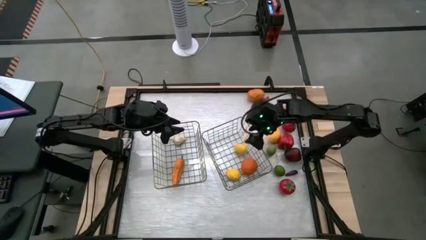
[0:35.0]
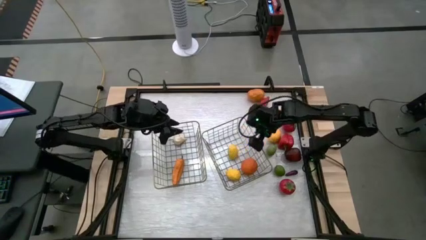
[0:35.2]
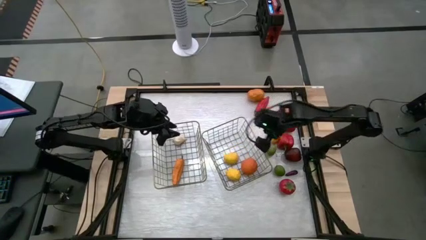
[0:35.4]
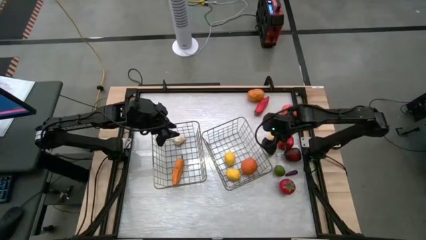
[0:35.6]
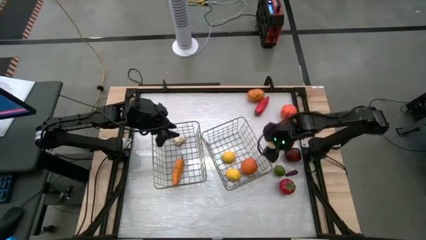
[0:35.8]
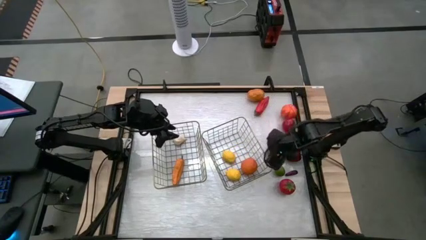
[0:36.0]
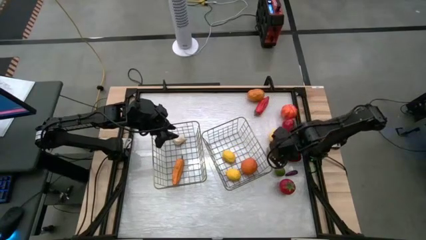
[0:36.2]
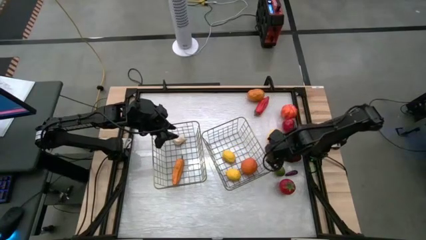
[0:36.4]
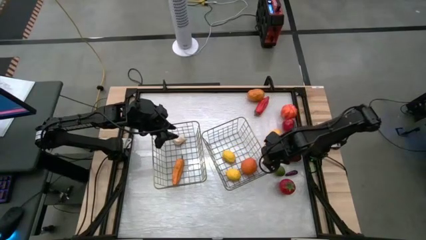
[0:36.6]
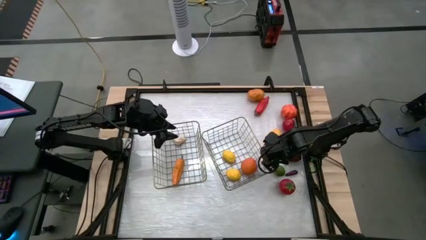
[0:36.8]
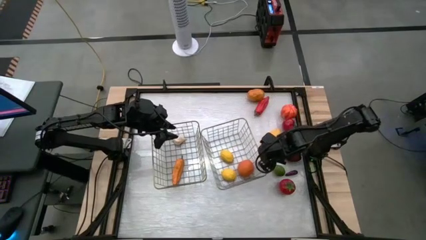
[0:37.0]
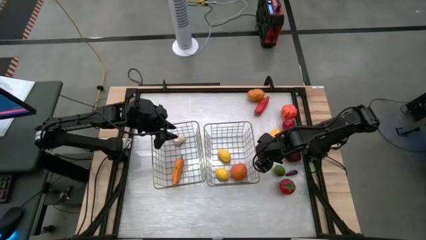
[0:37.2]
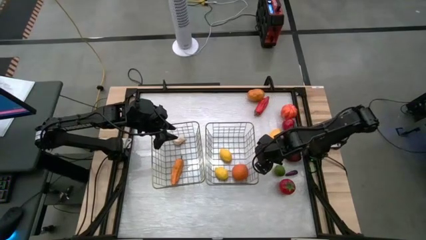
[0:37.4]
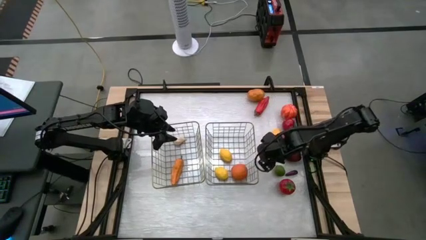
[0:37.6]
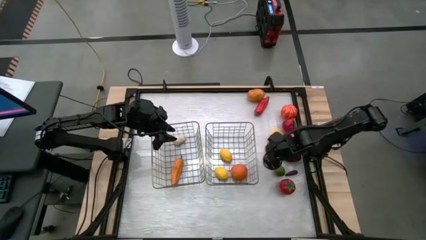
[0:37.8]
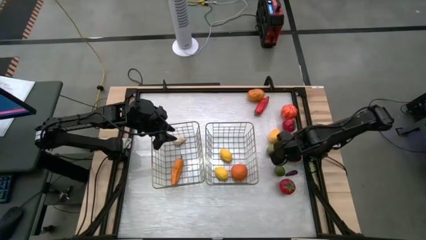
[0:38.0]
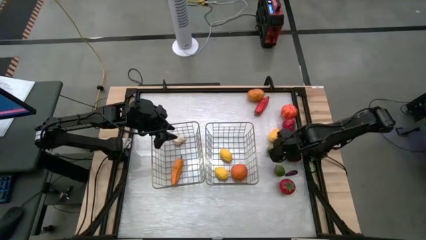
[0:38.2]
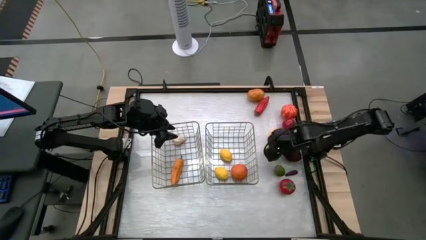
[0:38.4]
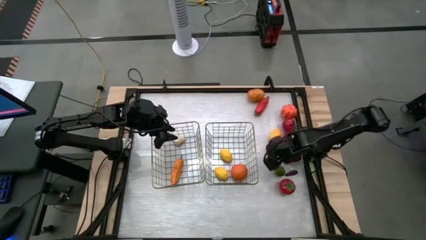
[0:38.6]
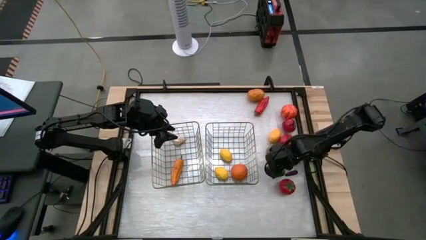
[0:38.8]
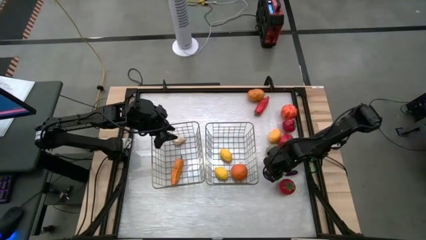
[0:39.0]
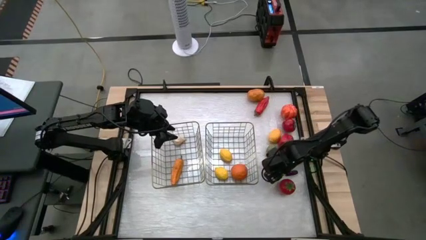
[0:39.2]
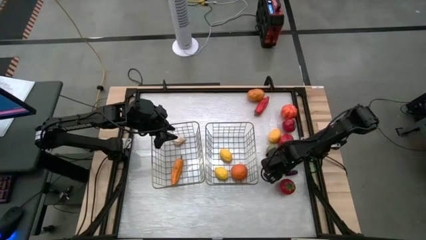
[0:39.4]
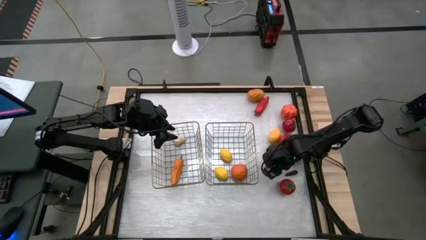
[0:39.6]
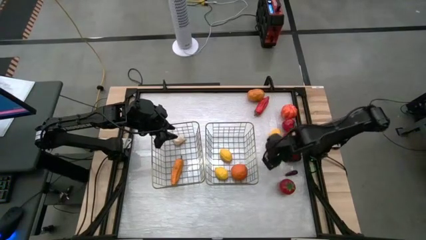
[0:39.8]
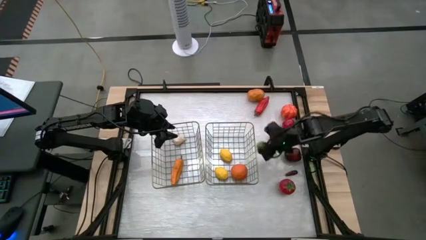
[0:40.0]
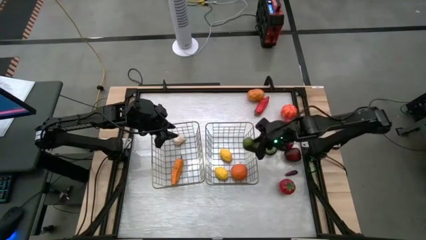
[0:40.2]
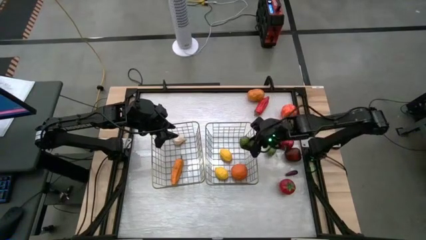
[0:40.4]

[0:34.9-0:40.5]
Task: Sort produce into baskets
Put the bottom green lime into the right basket

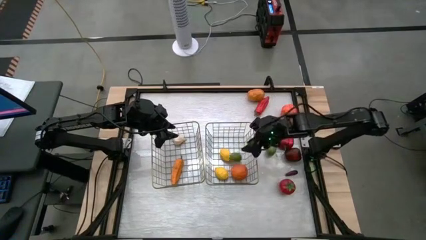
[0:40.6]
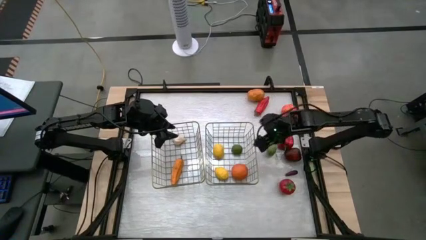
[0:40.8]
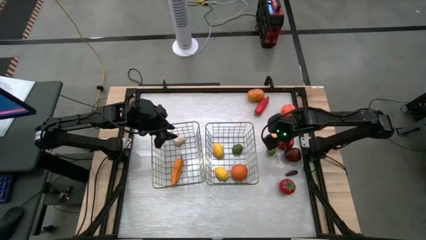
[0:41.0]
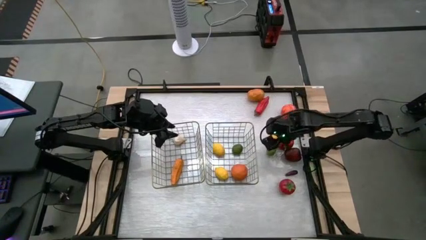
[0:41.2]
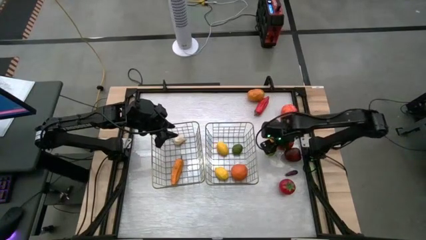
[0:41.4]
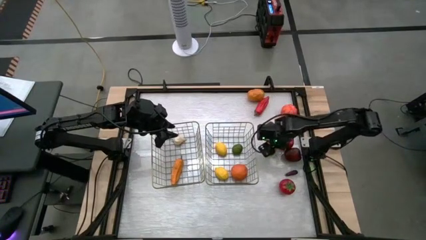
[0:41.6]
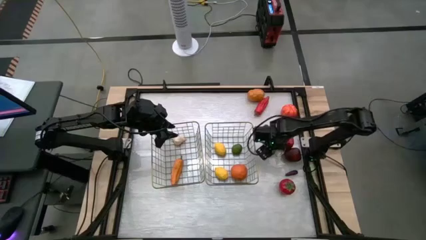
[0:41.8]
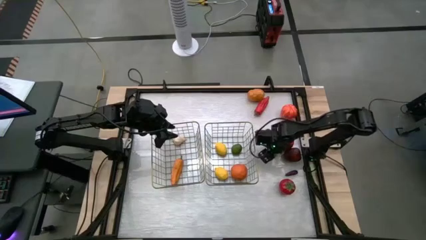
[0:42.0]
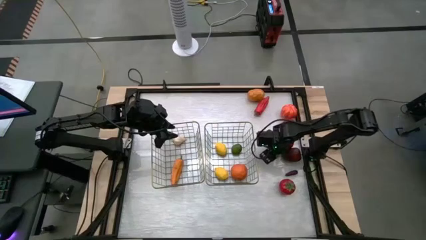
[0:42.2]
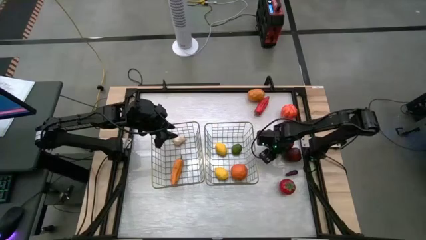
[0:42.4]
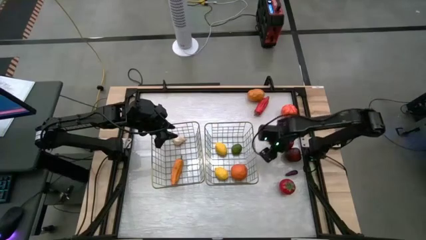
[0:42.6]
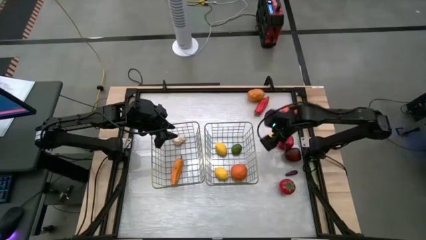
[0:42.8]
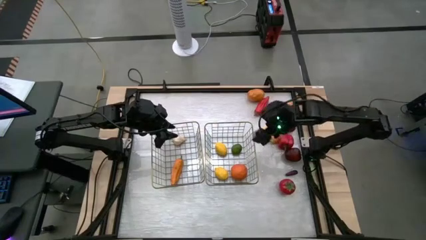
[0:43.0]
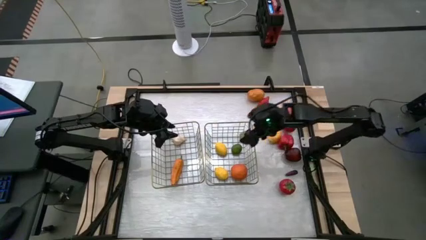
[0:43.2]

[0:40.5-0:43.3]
Put the green lime into the right basket

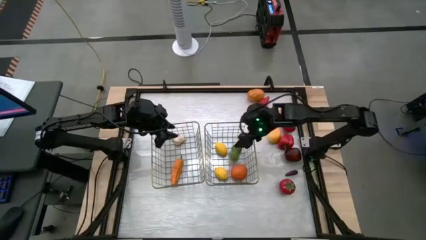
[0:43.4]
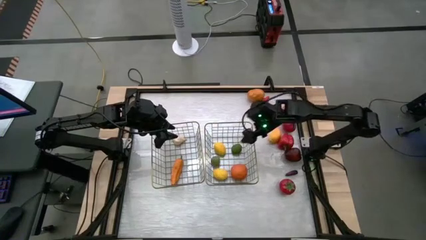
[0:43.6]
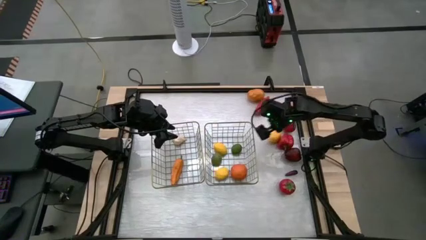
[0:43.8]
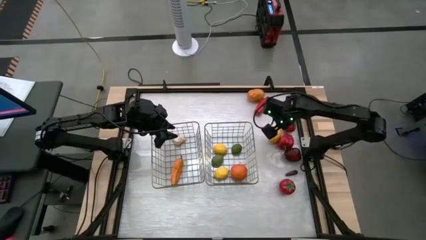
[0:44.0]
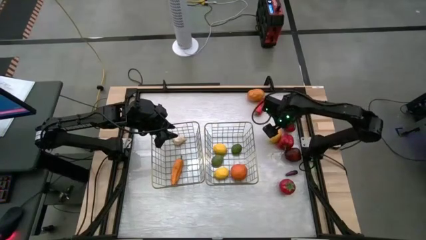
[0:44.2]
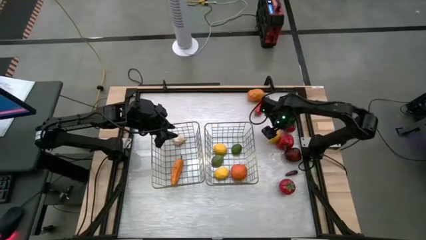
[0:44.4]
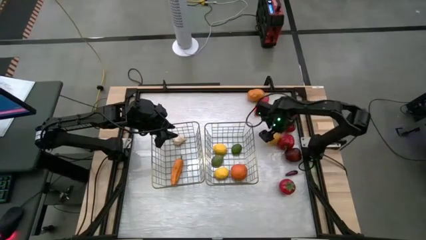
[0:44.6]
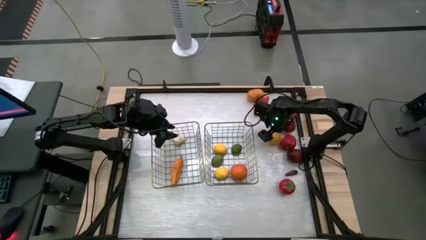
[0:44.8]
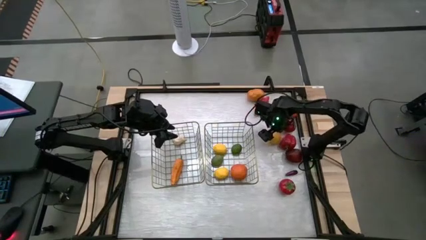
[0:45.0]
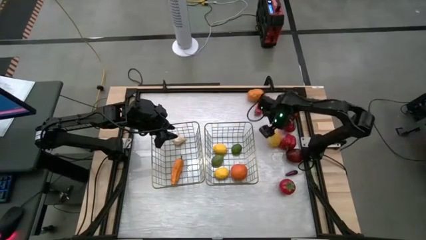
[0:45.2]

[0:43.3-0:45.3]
Put the yellow lemon into the right basket

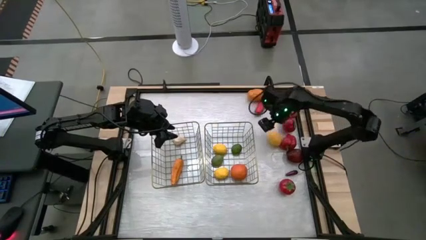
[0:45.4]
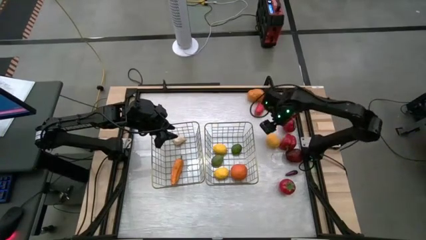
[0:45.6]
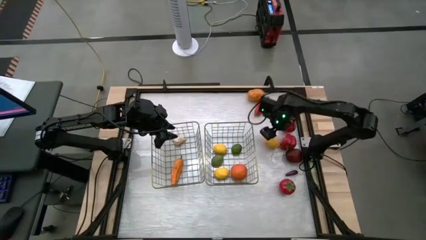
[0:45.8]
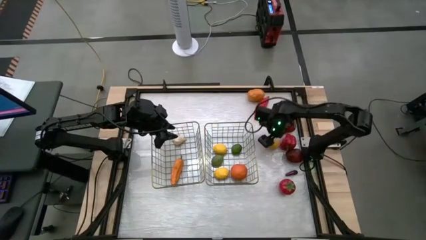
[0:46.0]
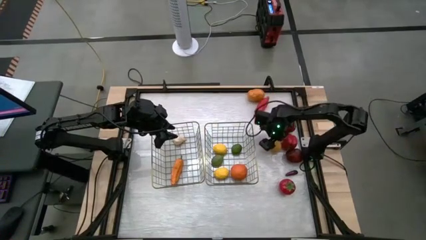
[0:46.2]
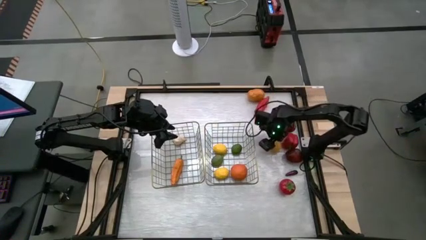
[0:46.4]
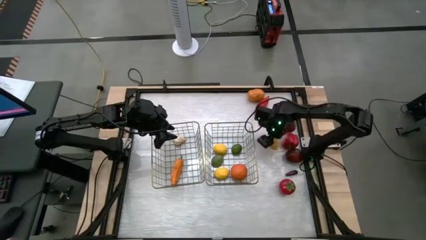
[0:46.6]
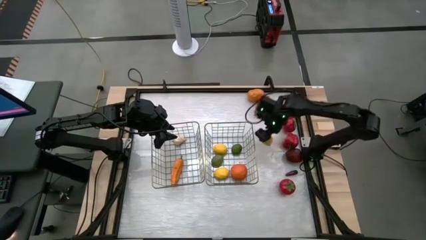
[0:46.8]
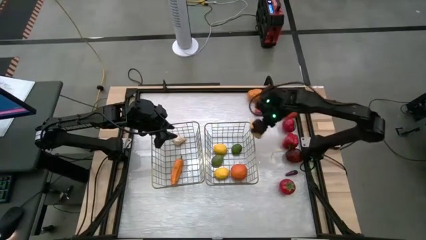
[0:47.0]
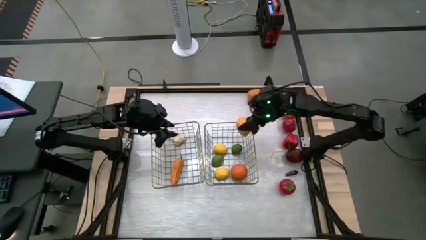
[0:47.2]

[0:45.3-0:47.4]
Put the yellow lemon into the right basket

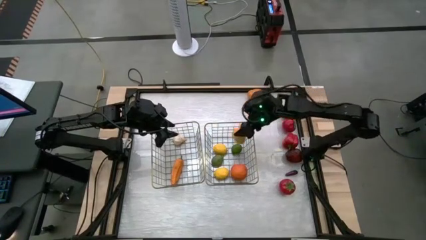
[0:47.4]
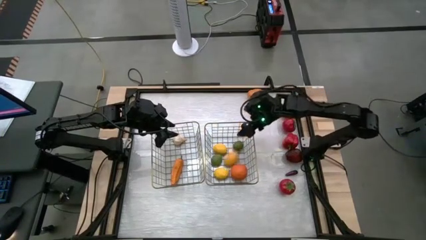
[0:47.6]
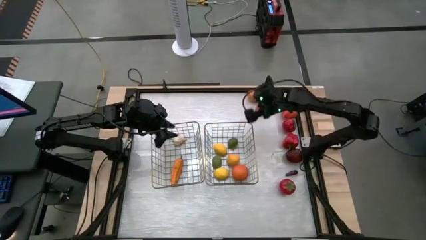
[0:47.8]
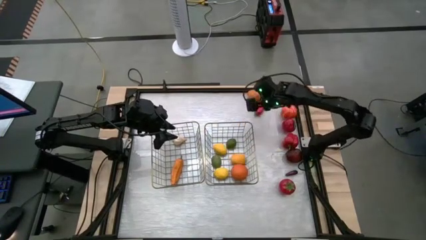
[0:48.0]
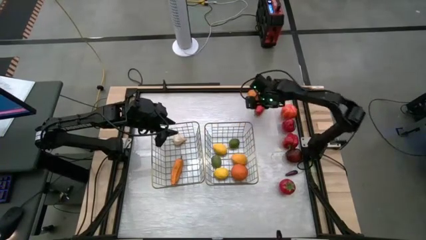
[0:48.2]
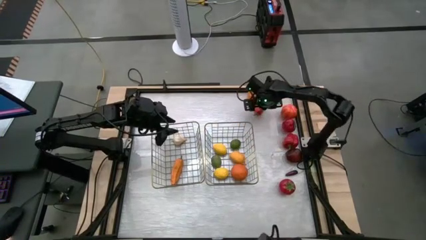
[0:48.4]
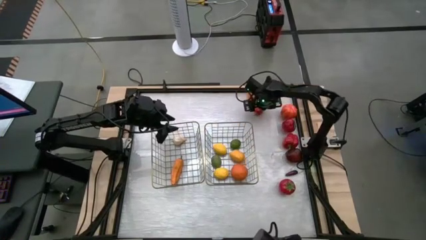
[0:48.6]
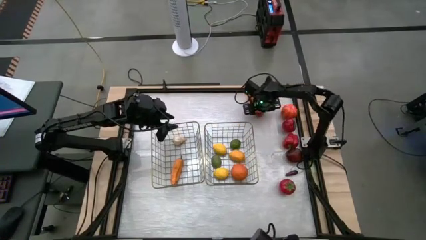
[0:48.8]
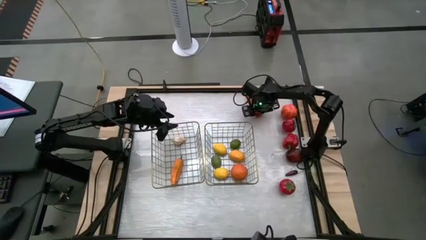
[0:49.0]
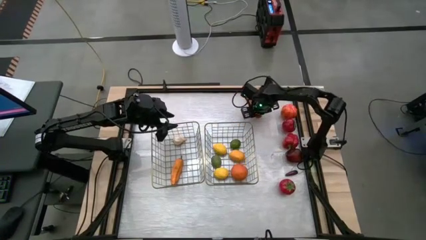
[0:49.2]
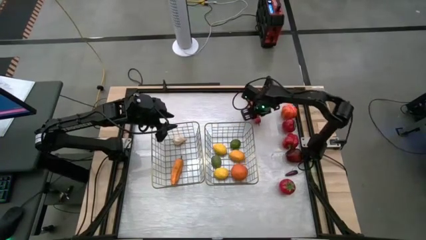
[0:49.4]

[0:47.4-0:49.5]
Put the red chili pepper into the left basket

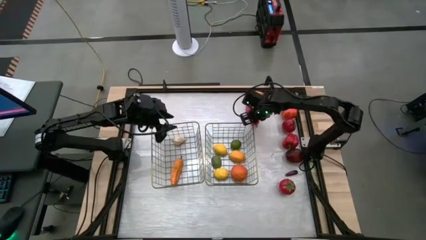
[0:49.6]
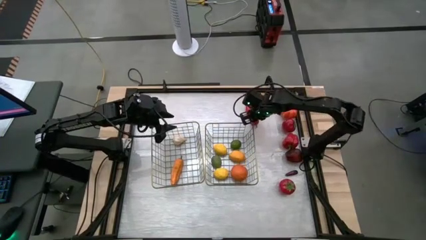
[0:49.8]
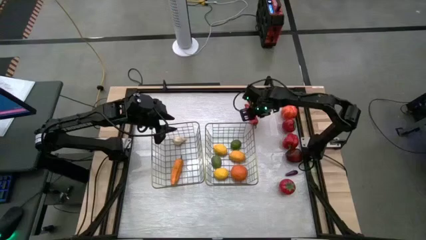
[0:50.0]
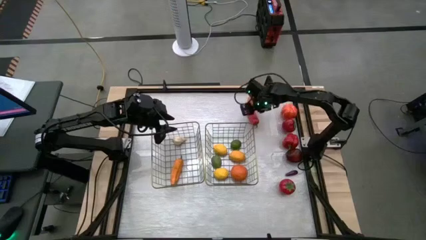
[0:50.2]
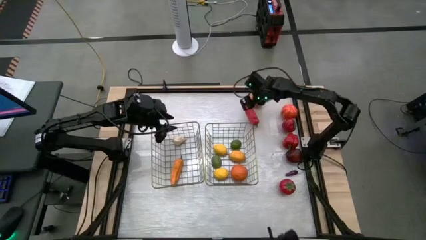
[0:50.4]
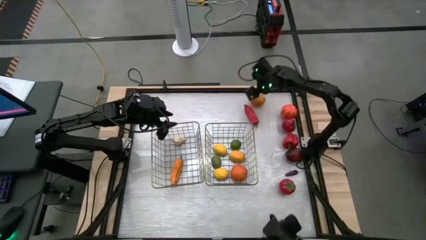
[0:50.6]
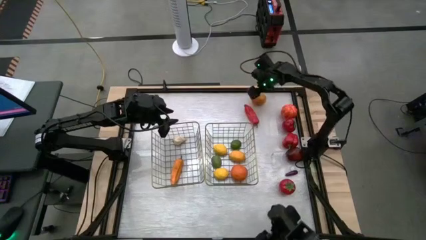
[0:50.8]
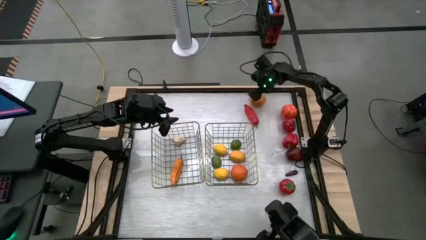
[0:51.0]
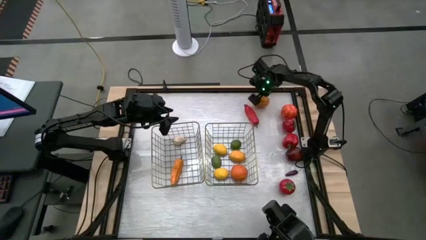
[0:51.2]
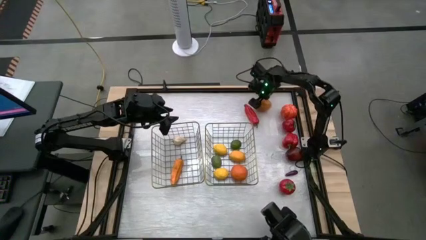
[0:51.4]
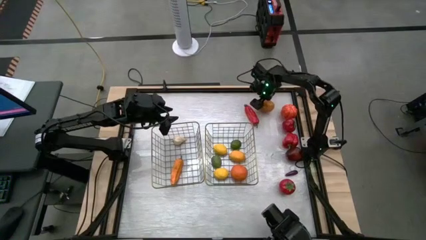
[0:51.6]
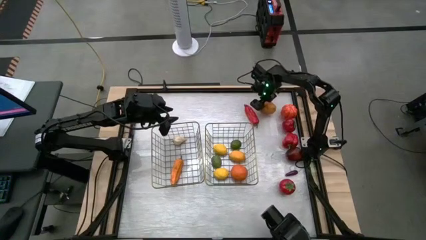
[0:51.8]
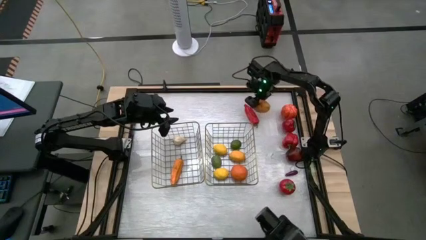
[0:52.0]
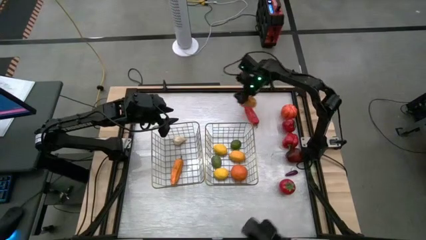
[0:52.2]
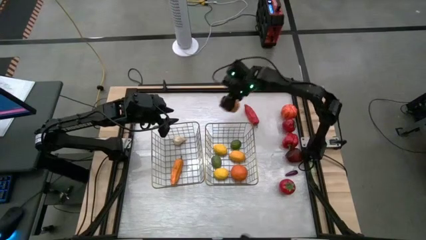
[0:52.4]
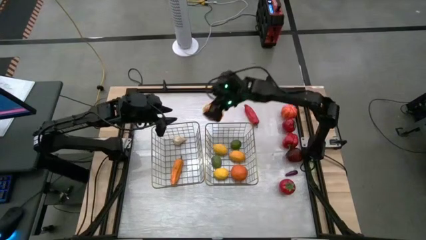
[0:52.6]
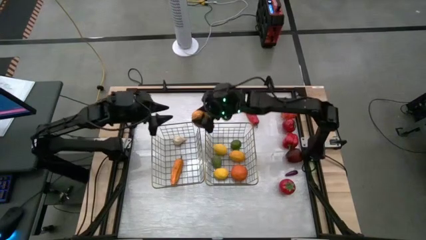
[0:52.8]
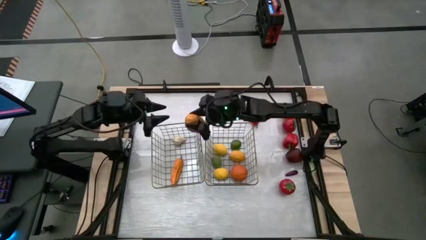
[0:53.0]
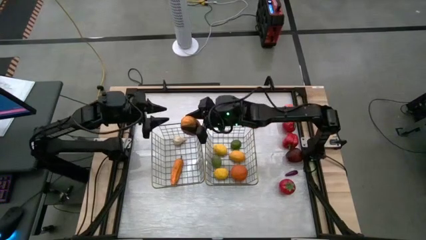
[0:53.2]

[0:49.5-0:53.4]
Put the brown potato into the left basket
